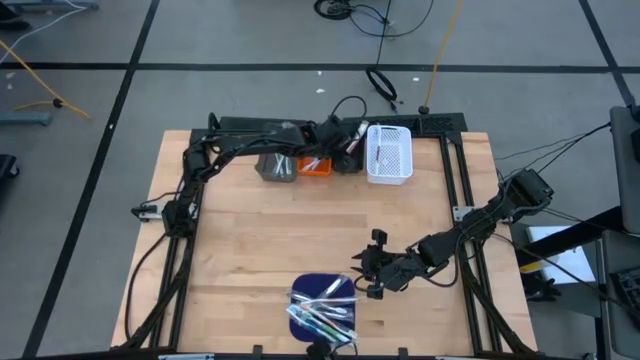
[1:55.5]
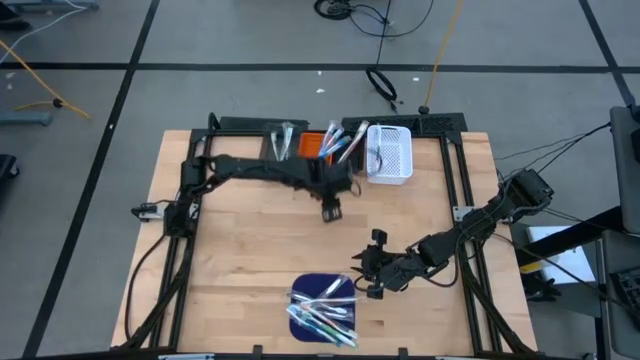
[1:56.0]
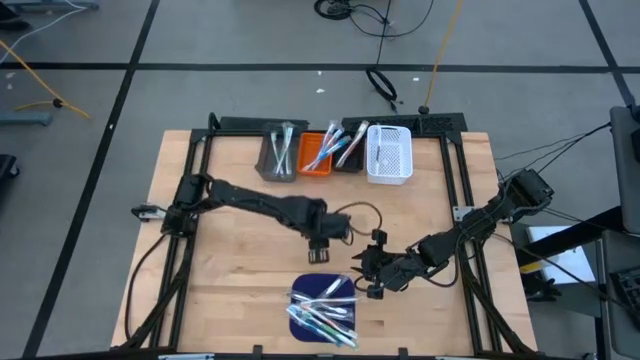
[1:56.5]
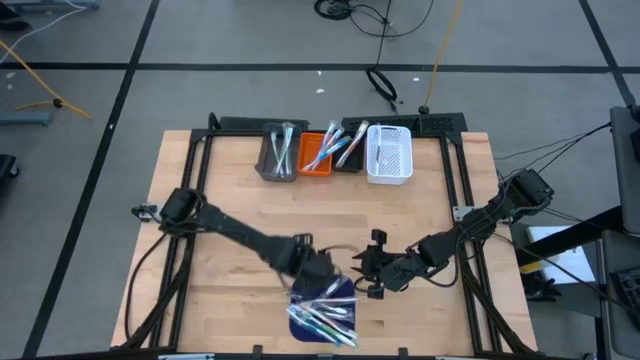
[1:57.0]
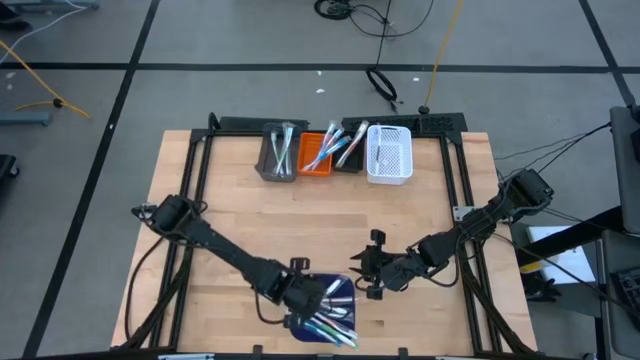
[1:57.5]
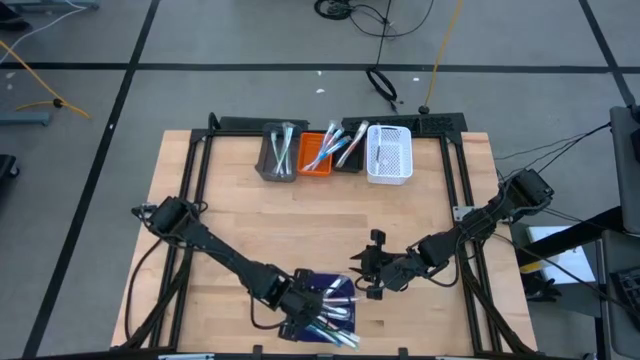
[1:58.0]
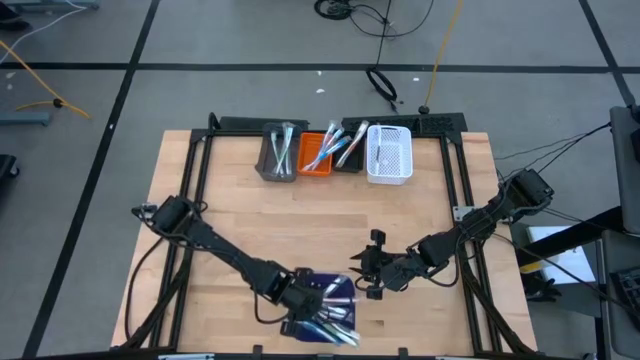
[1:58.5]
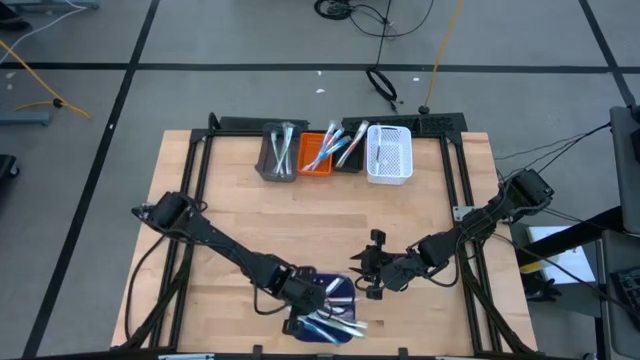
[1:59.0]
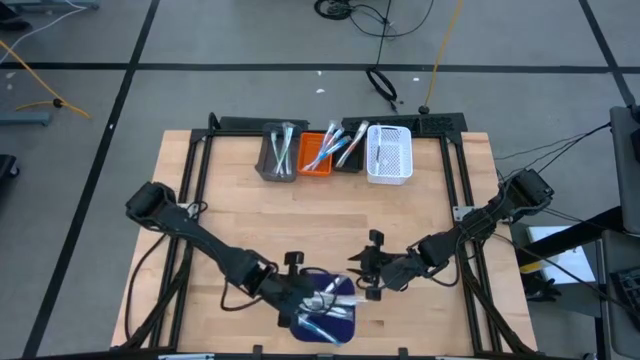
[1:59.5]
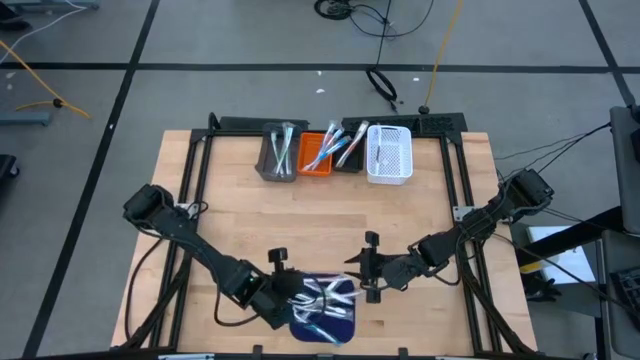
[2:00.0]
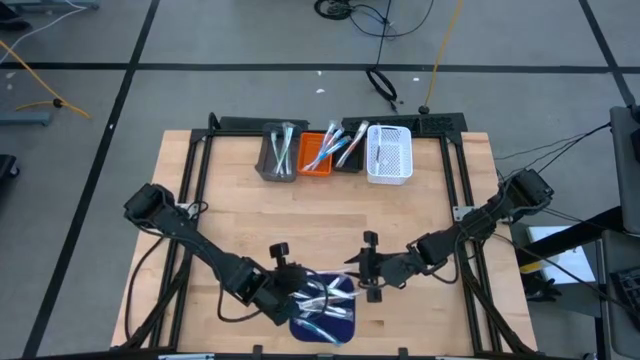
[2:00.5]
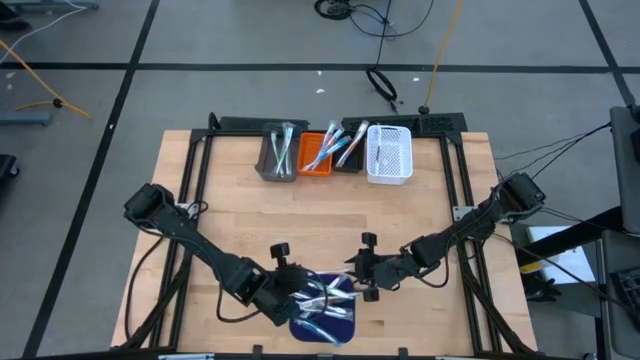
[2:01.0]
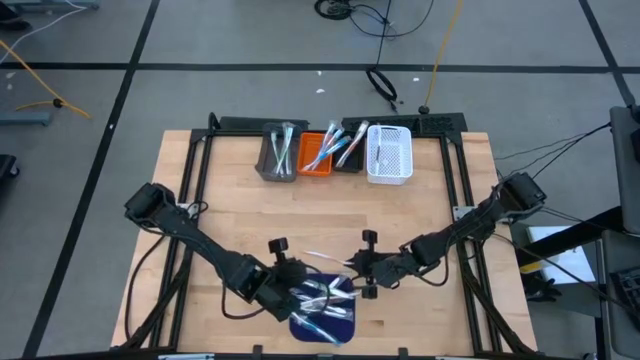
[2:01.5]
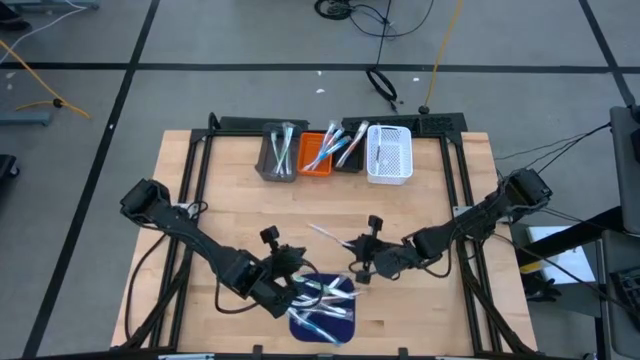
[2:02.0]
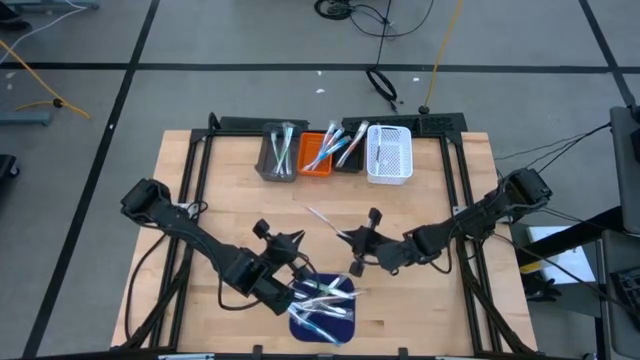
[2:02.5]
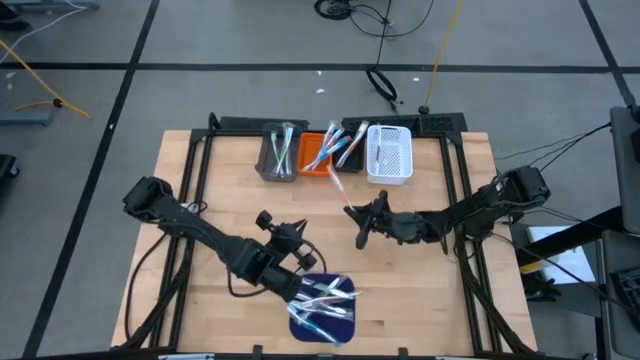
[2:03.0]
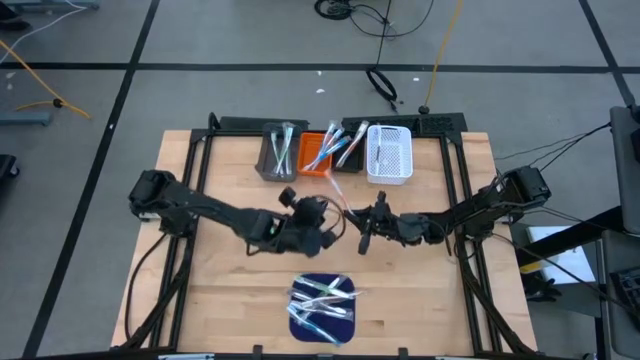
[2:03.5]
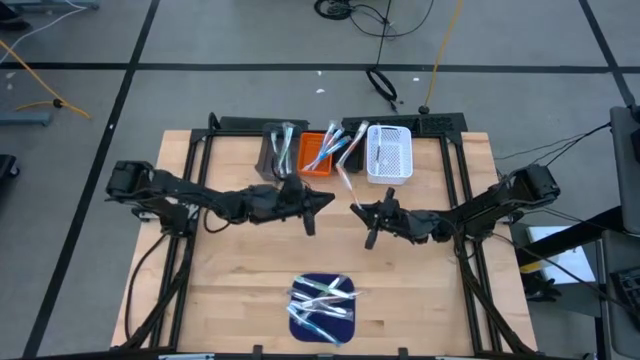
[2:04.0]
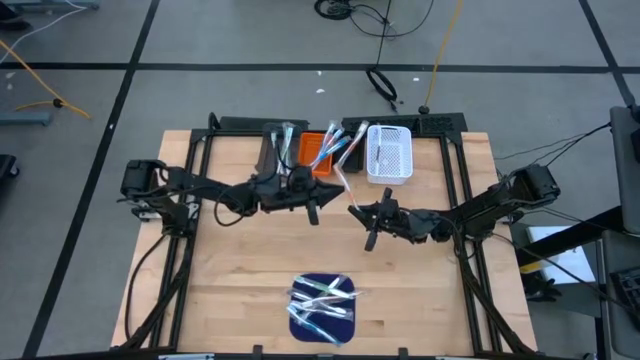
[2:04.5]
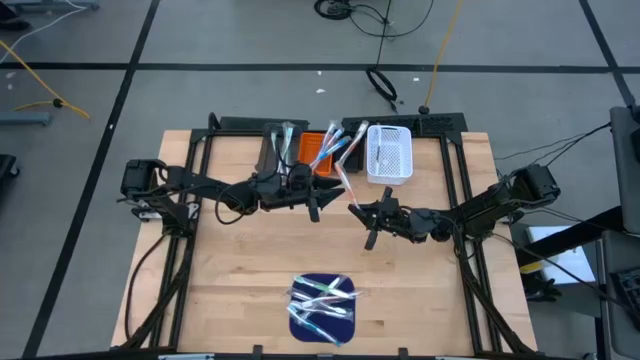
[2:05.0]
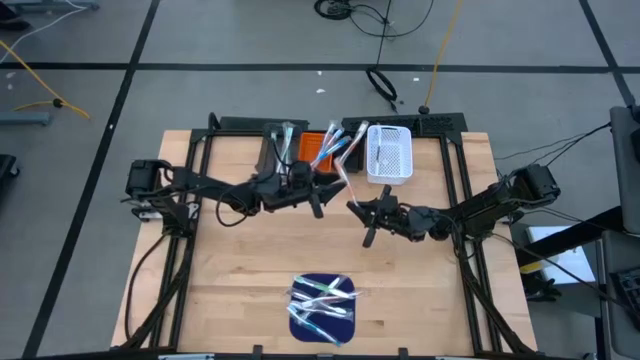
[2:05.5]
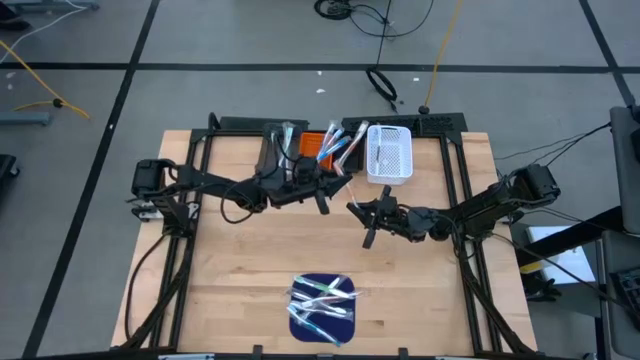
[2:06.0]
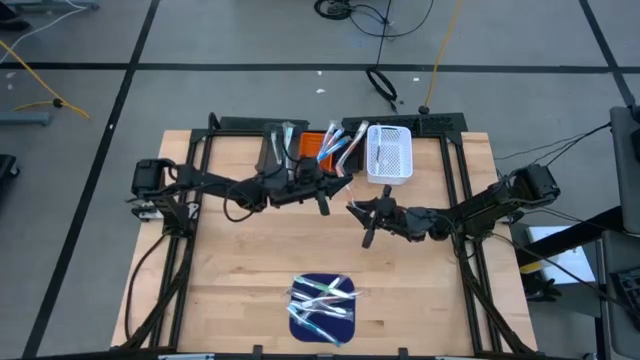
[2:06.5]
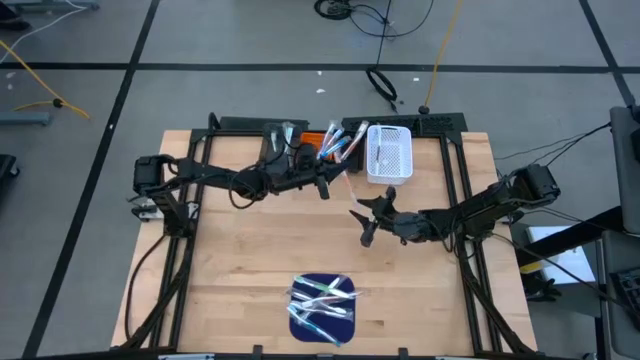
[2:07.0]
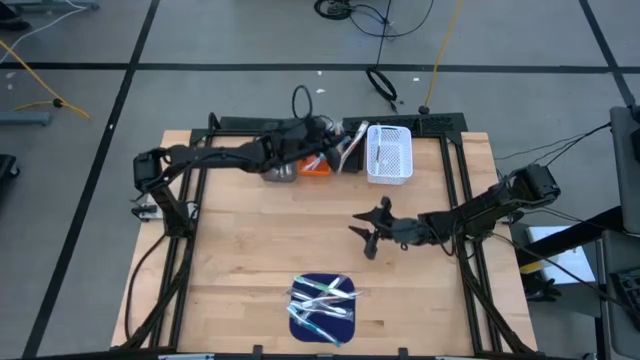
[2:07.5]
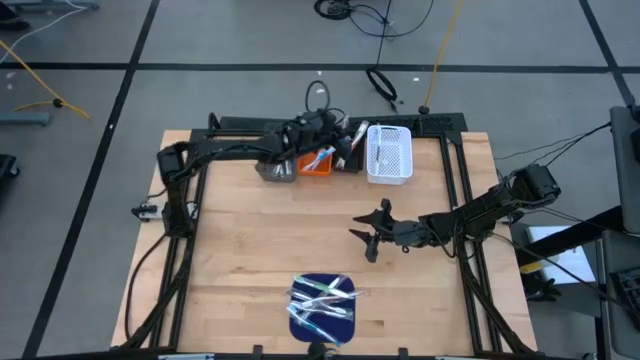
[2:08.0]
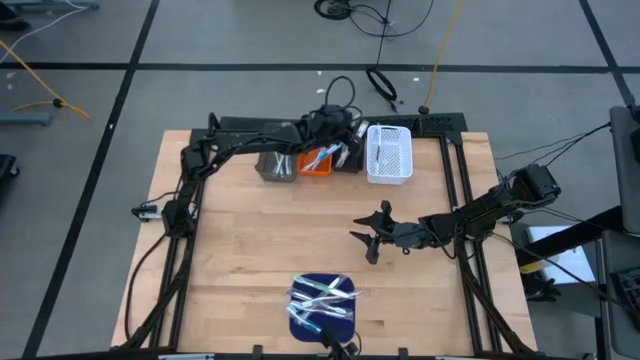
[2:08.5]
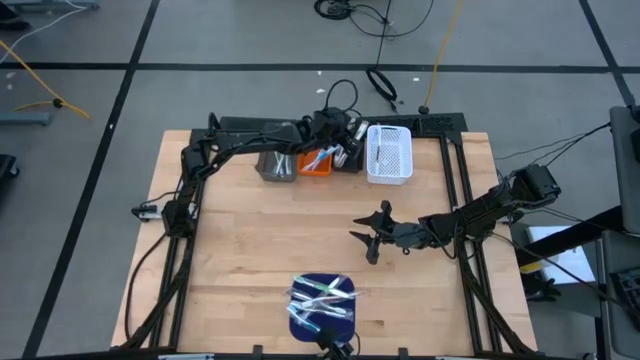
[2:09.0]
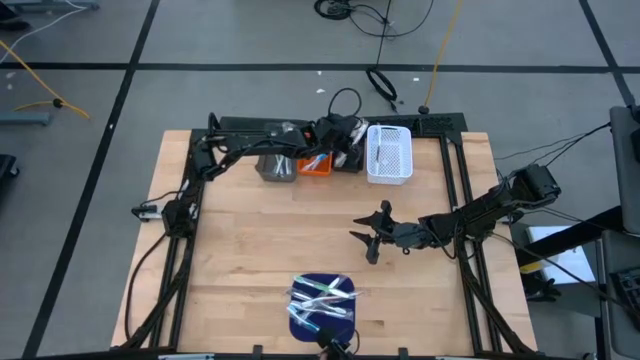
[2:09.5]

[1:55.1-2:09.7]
Task: Pick & Place Toothbrushes
Put the orange toothbrush into the black bin

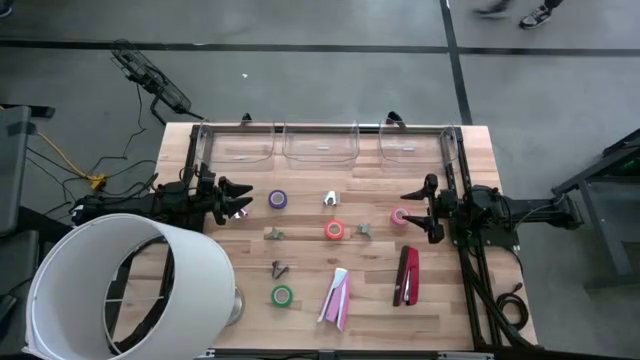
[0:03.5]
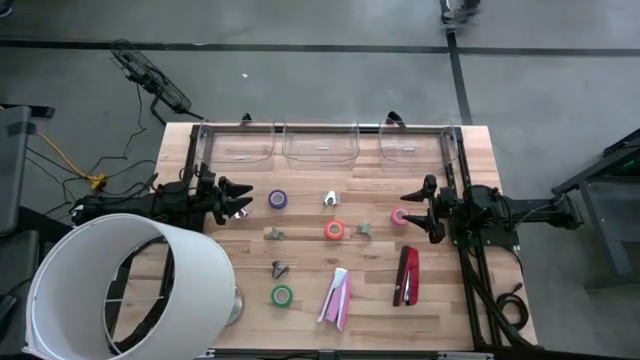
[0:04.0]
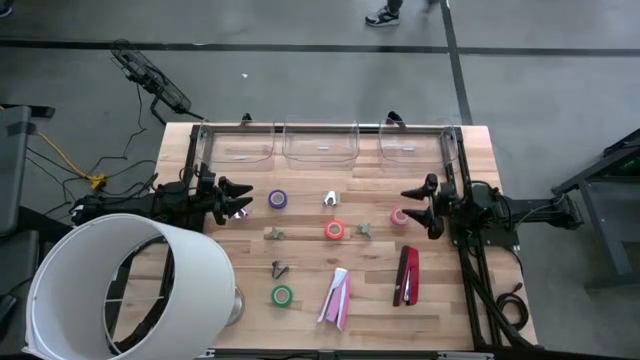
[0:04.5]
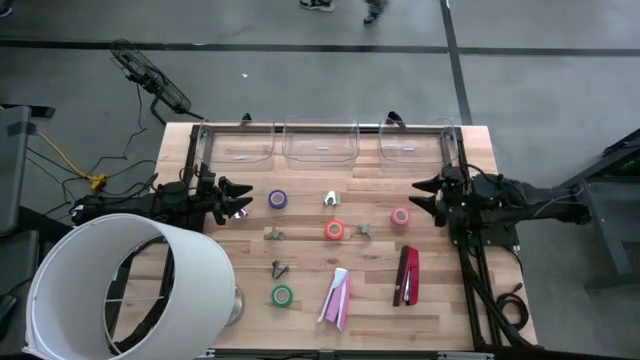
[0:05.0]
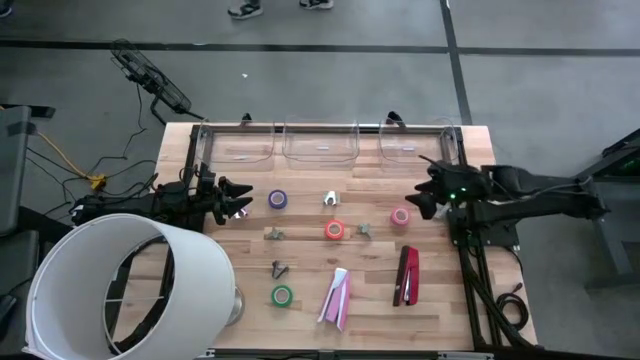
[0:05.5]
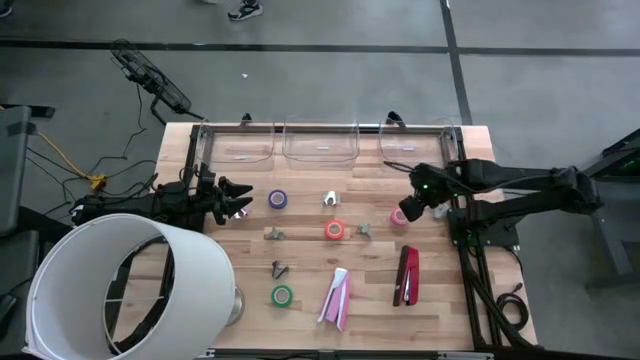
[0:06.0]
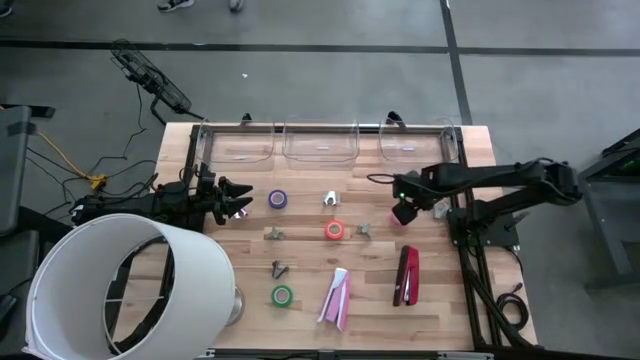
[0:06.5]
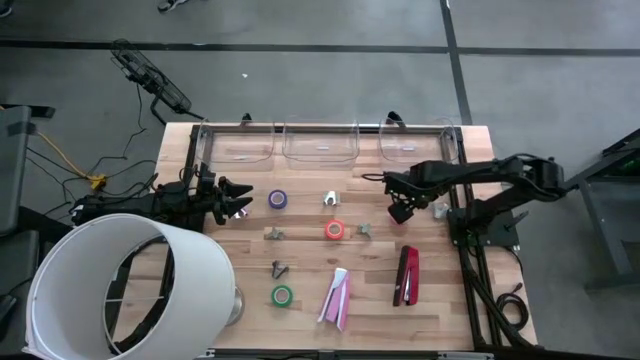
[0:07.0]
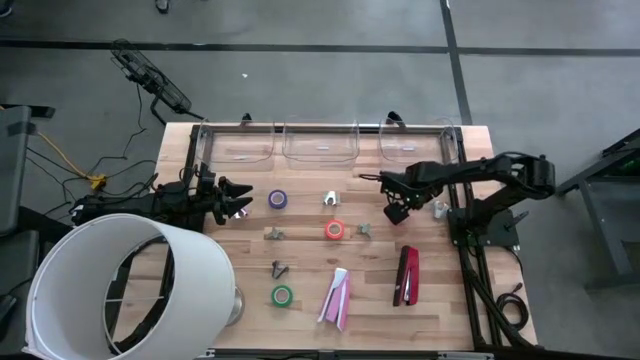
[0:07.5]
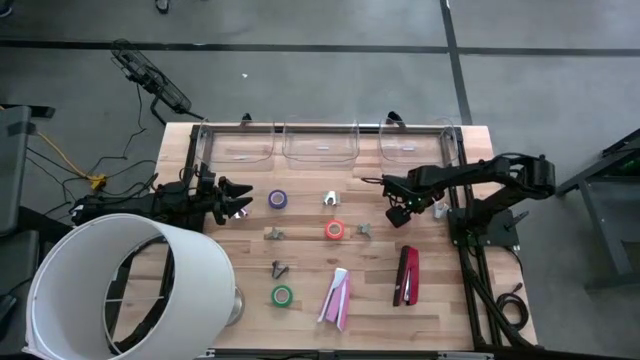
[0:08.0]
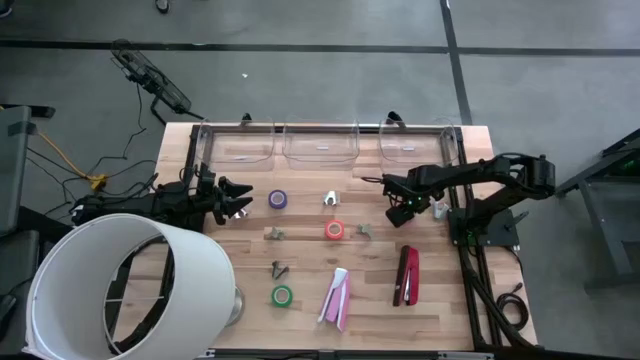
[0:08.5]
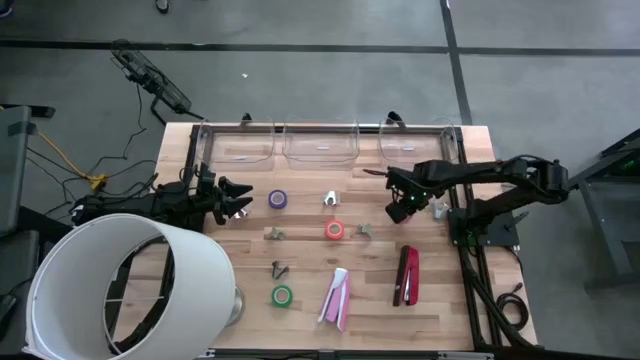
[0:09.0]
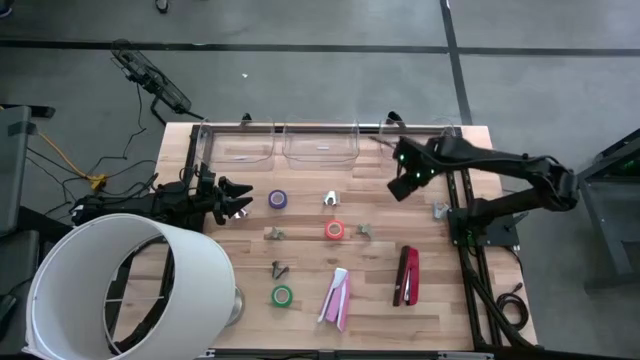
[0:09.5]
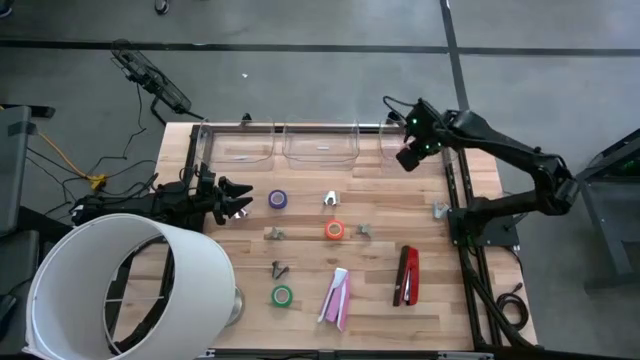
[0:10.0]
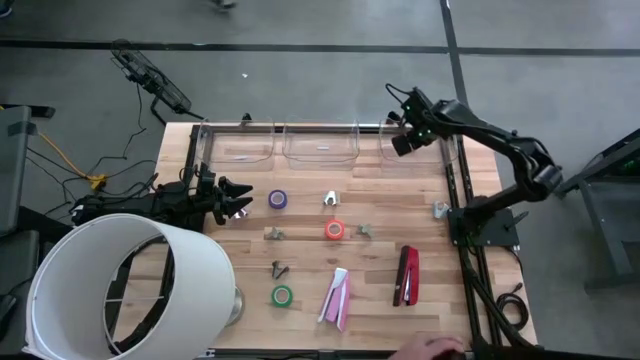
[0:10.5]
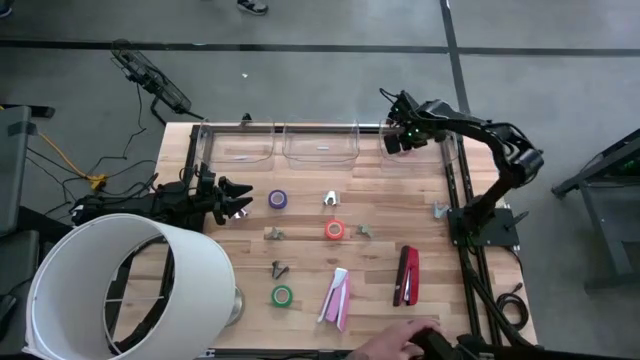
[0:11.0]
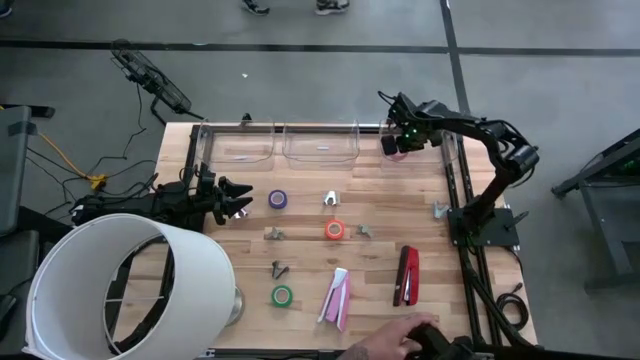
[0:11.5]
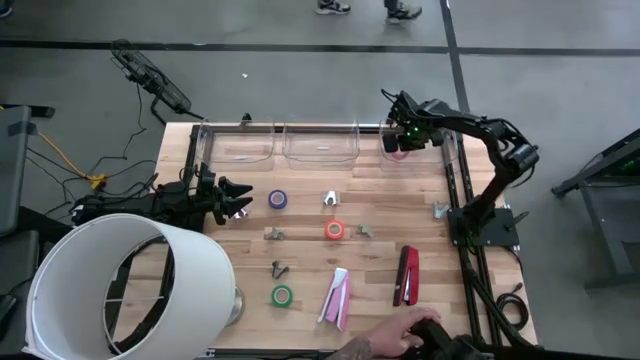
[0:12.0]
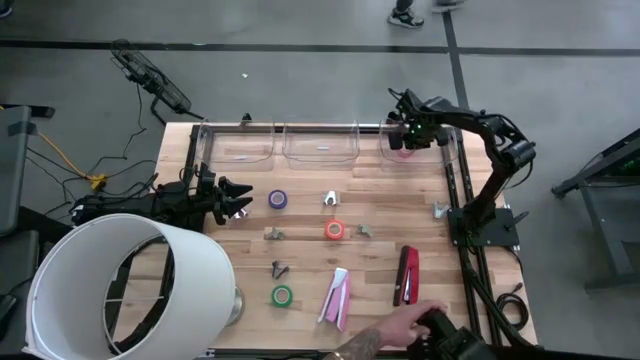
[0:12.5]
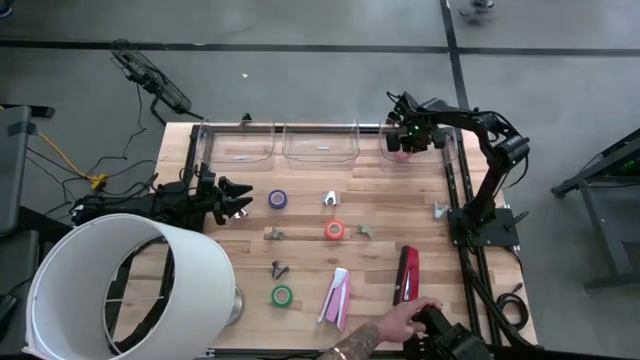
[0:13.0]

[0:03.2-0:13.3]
Task: Pick and place Stapler, Stapler remover, tape
Put the pink tape into the right transparent bin
